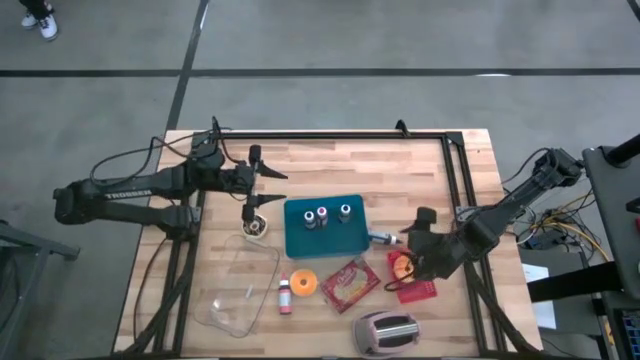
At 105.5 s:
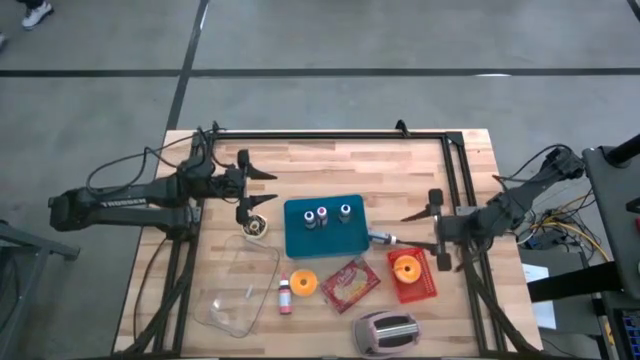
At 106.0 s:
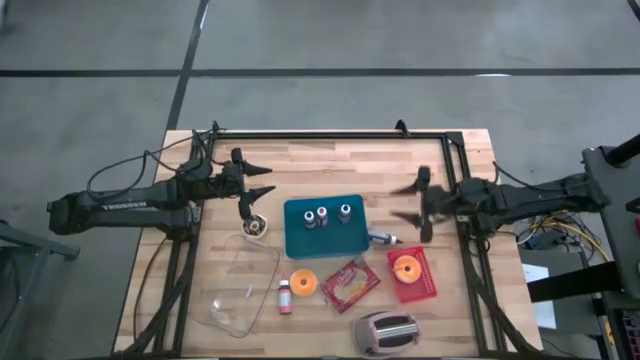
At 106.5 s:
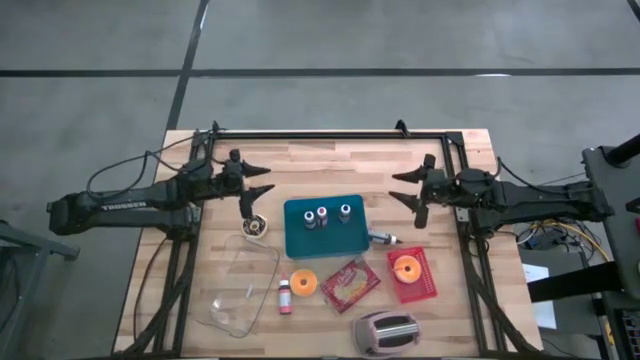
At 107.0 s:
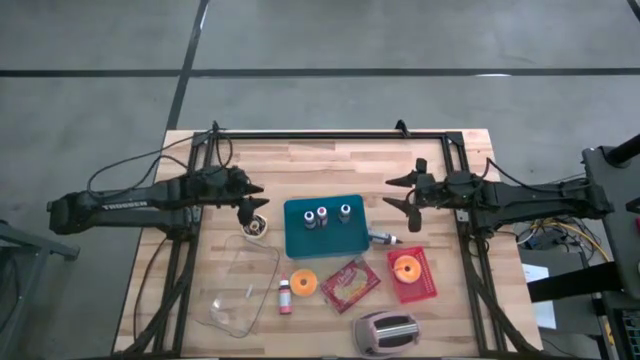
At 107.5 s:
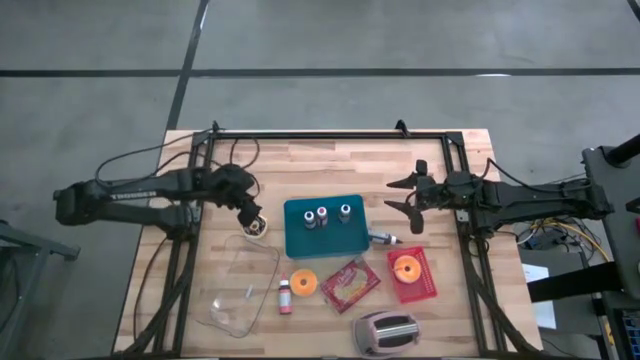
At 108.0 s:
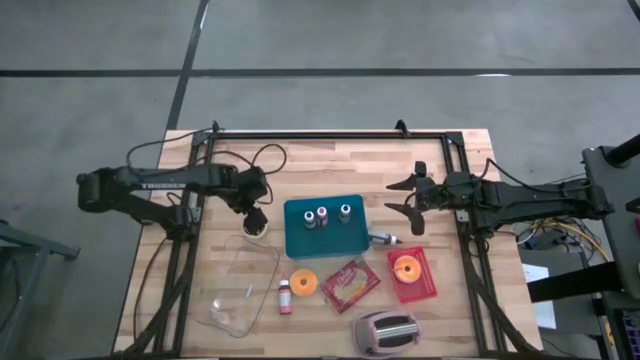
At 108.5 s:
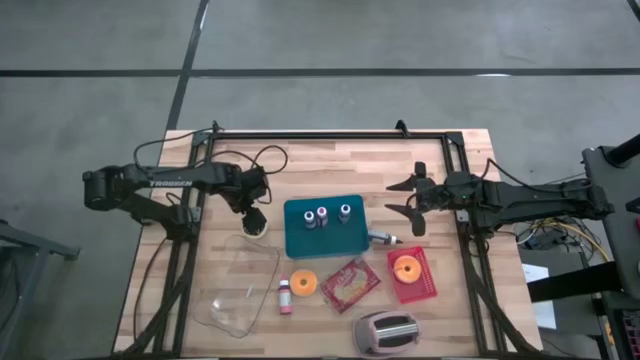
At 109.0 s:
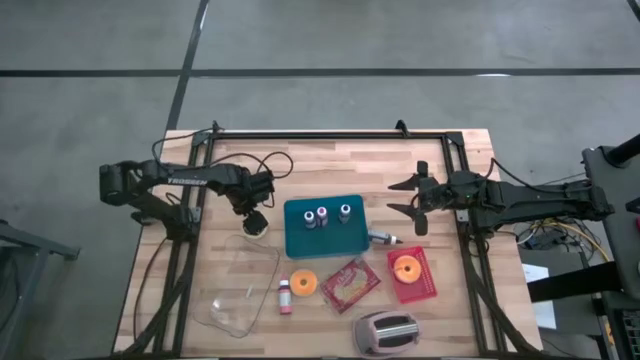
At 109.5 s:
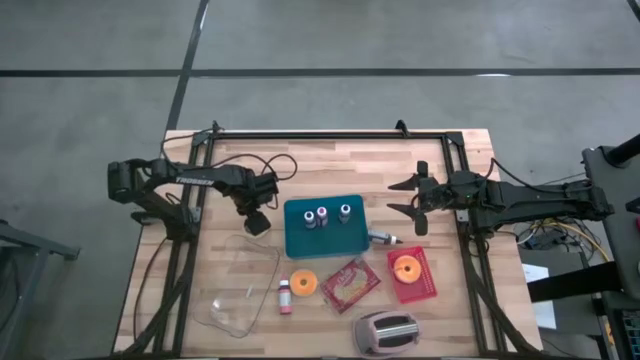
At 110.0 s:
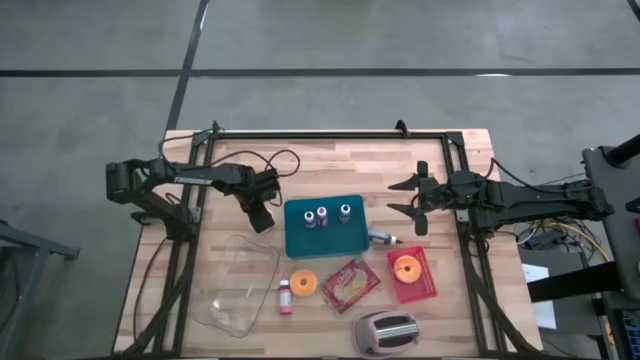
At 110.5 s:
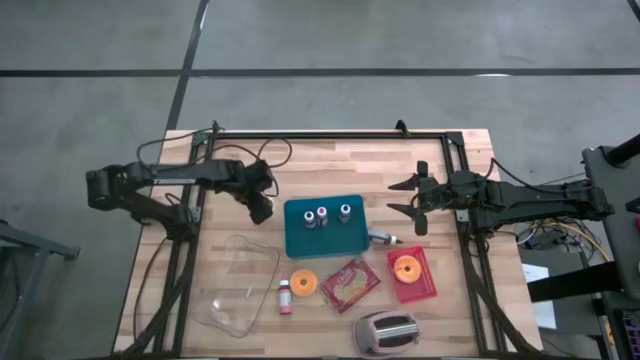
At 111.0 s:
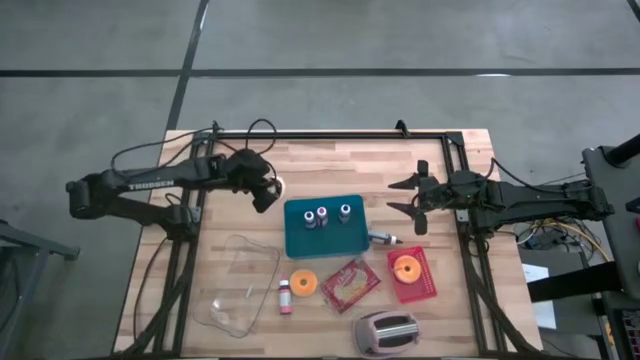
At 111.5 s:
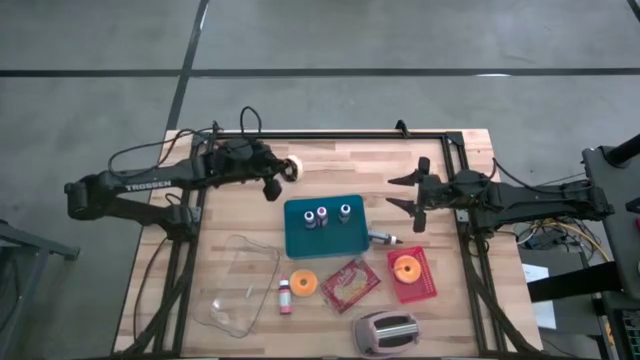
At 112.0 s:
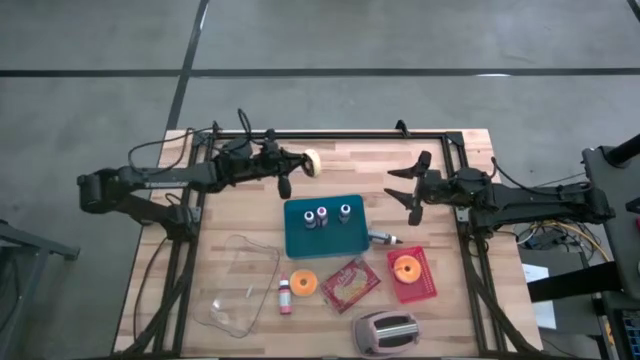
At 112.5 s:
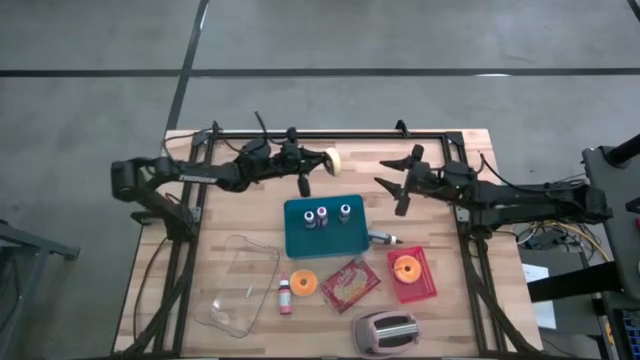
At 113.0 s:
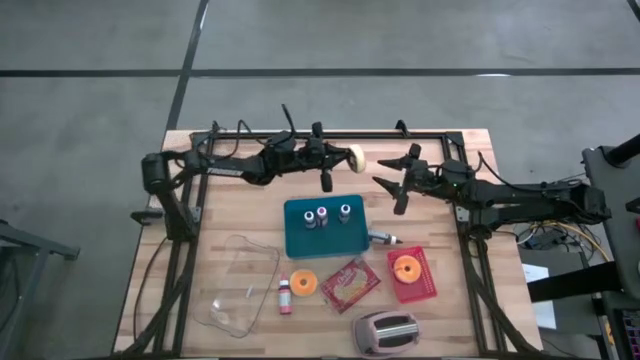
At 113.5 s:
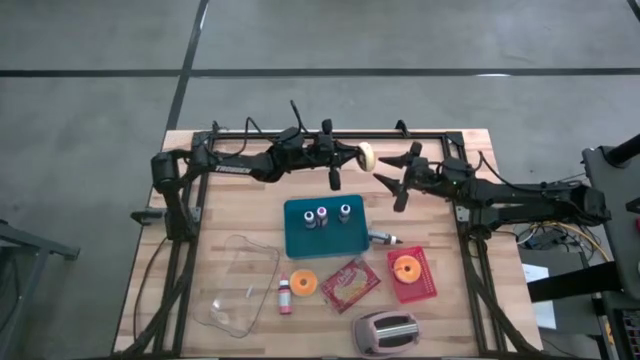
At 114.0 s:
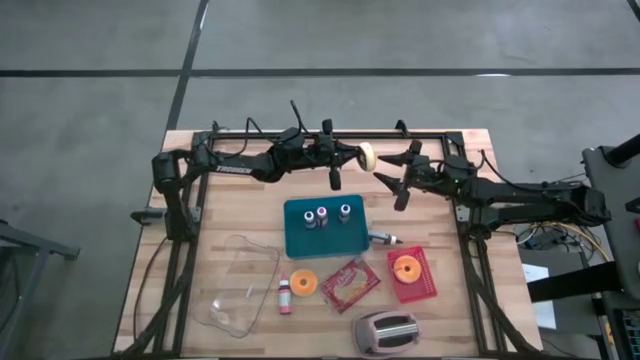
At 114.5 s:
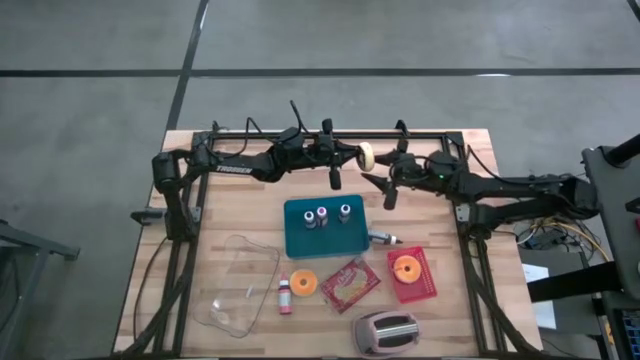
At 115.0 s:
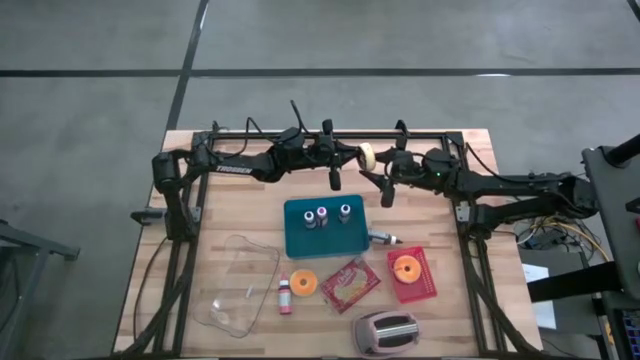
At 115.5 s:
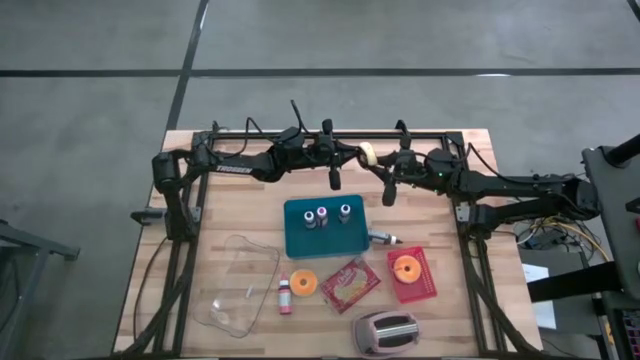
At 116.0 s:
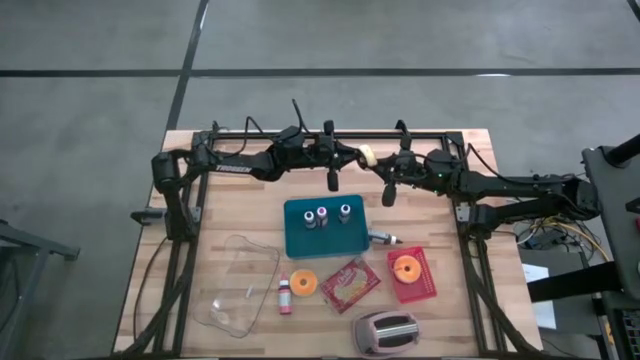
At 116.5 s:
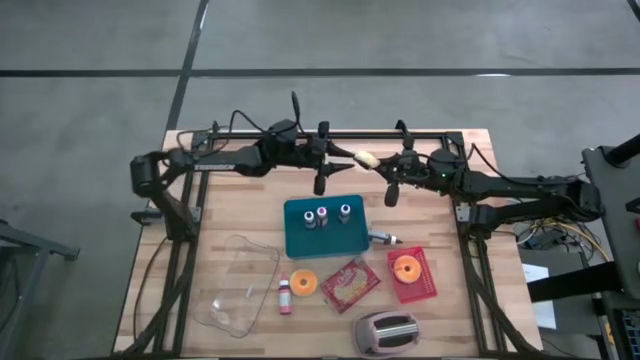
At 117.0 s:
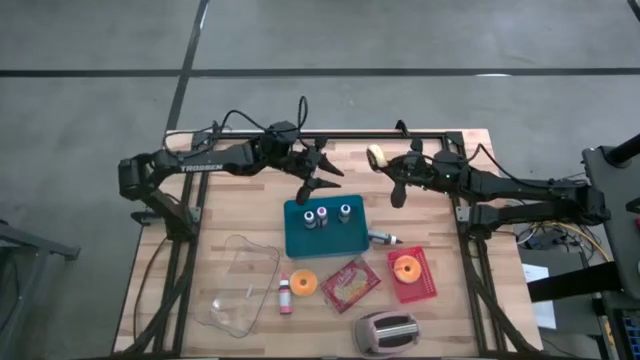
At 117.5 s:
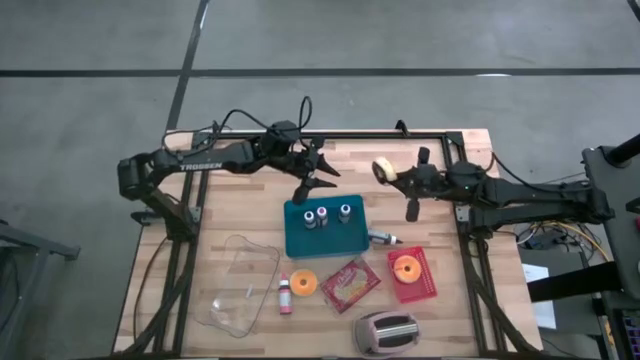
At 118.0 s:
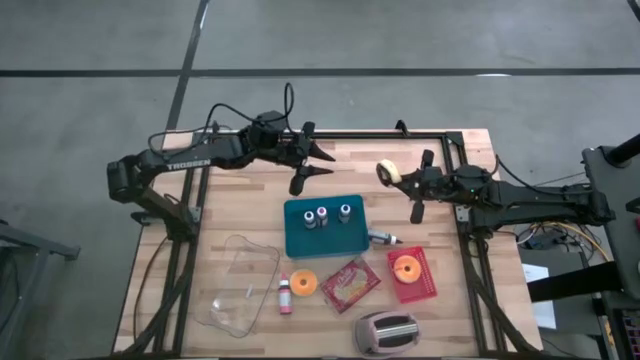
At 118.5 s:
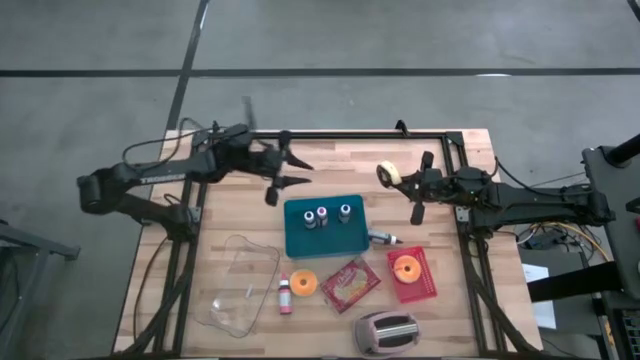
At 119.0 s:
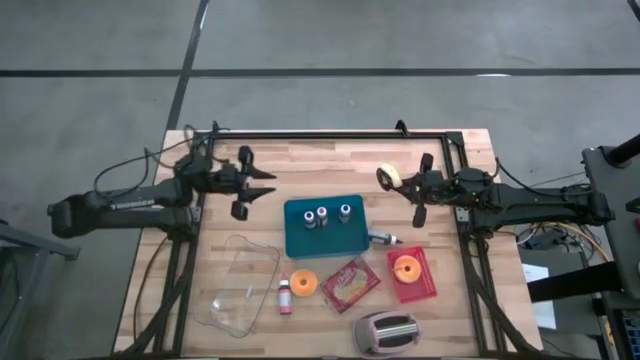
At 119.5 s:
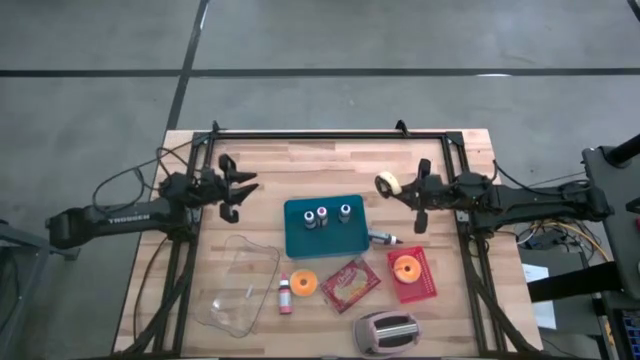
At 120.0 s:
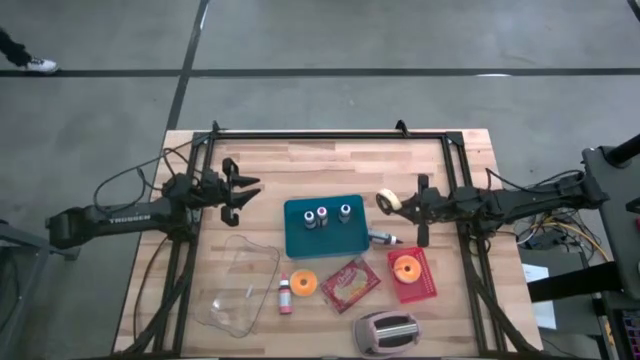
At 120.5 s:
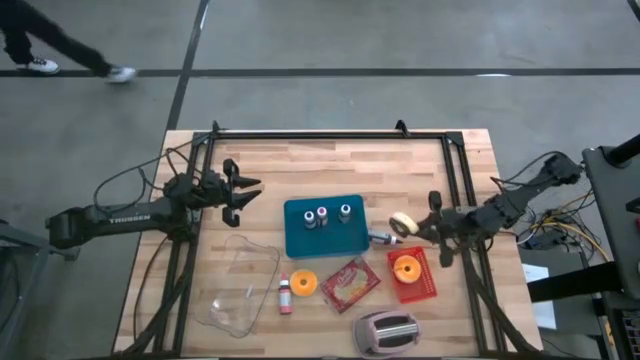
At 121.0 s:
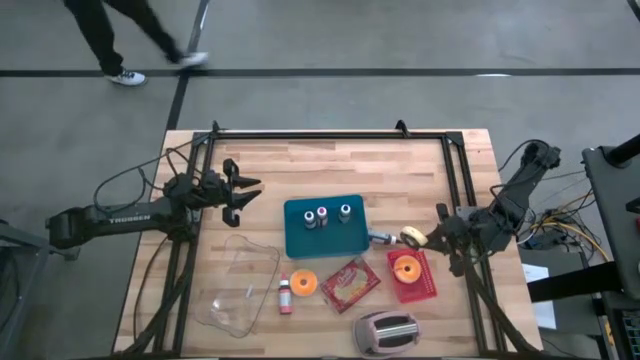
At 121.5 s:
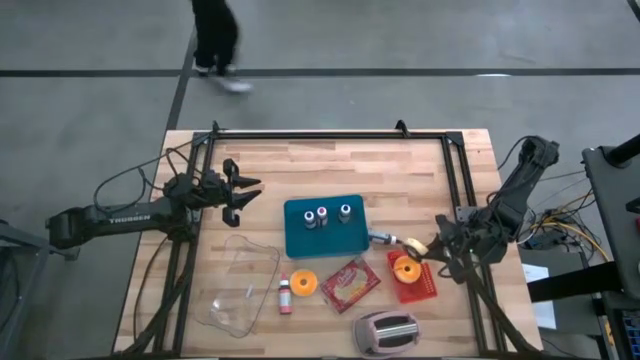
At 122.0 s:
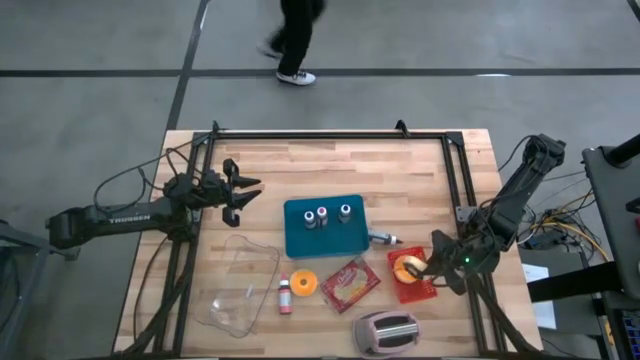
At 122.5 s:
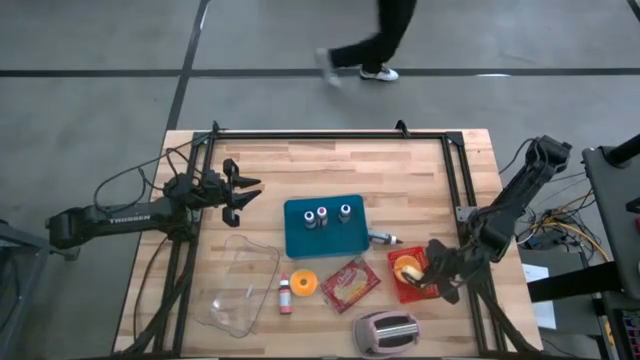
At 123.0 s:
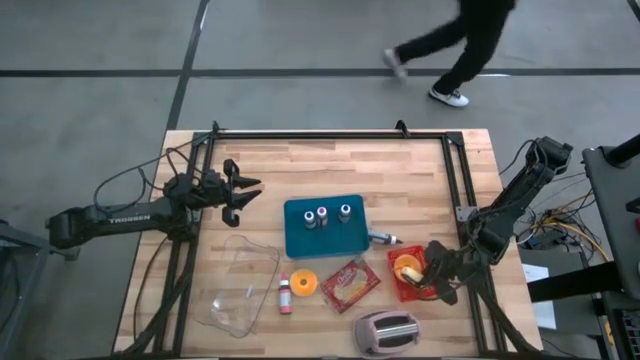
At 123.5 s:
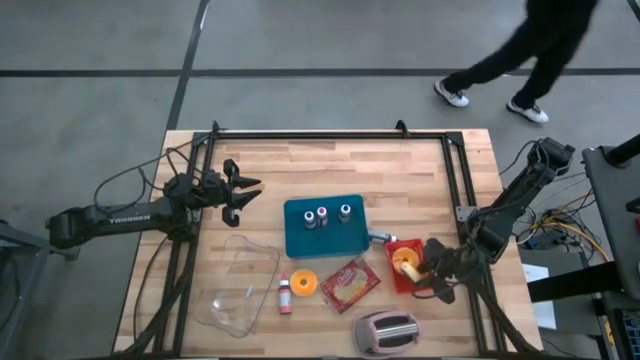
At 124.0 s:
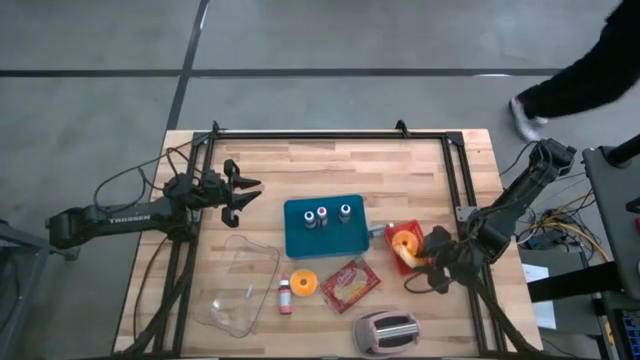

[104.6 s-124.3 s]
Task: Pick & Place Food Item
Put the black donut into the red bin

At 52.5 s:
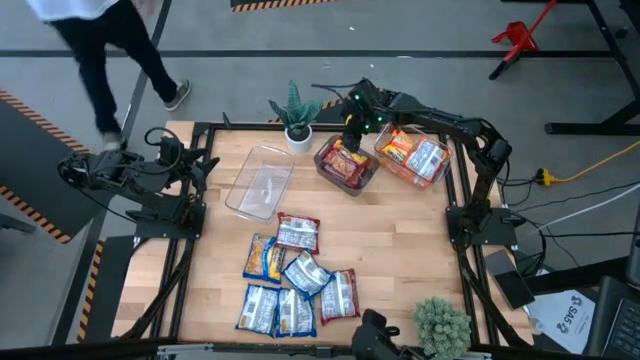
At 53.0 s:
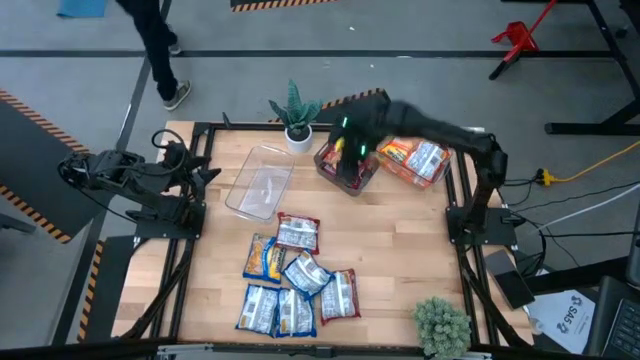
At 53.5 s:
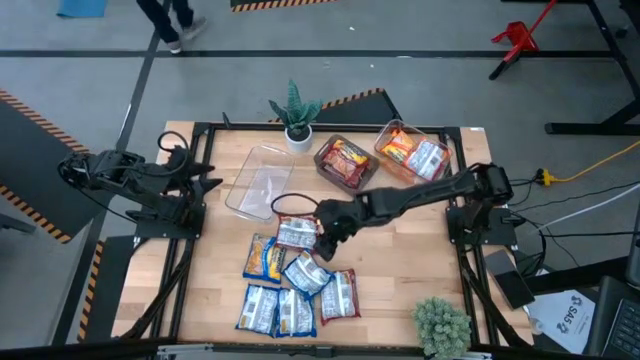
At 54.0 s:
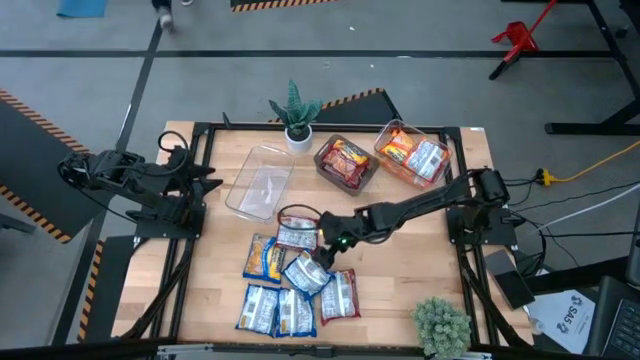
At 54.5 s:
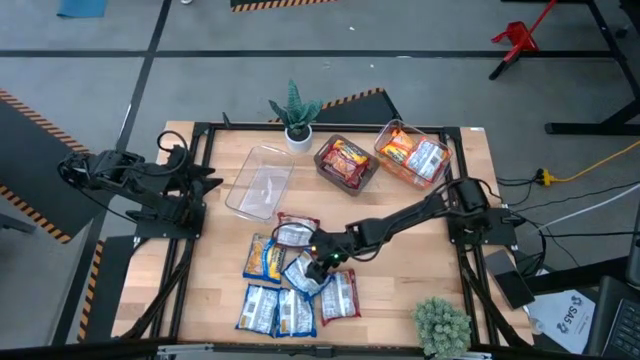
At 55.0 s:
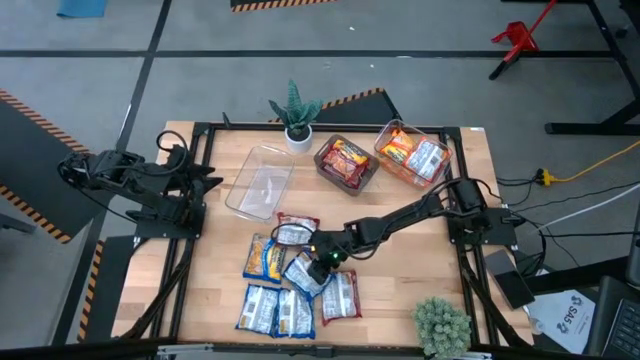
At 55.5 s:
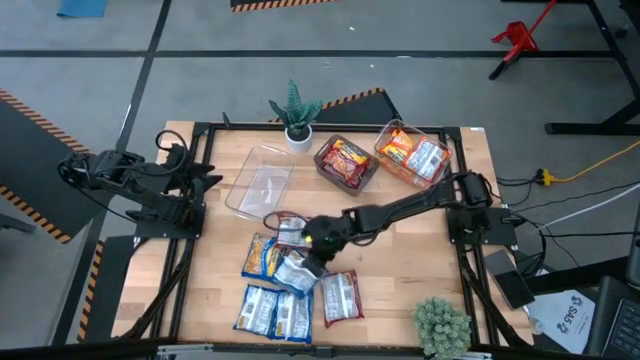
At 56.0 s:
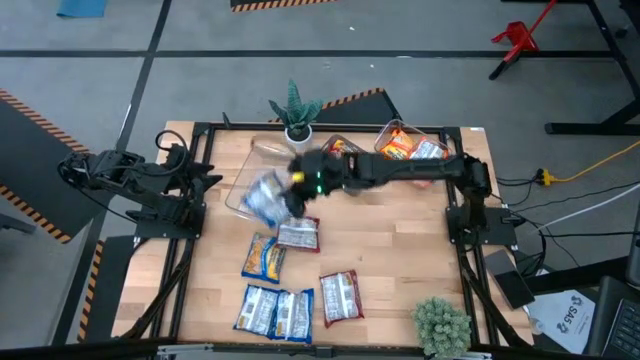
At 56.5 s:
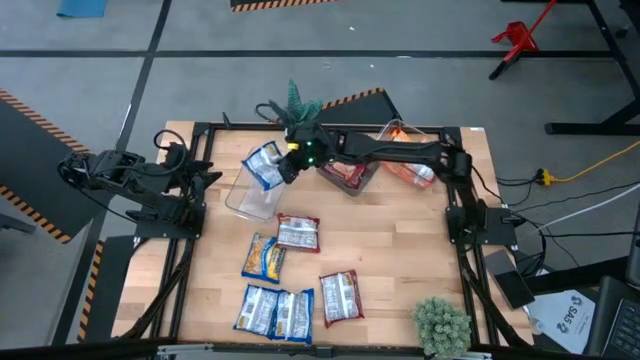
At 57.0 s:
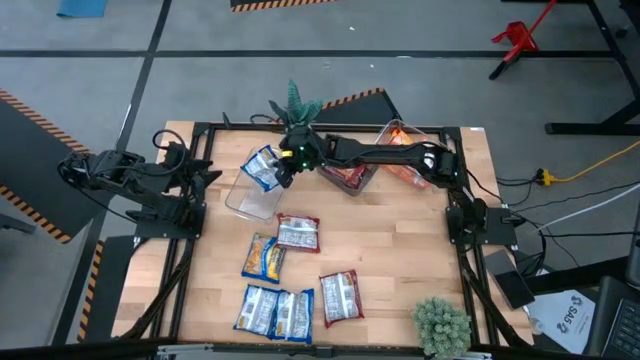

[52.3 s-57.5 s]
Task: Sort Maruchan noodles
Put the blue noodle pack into the left transparent bin
